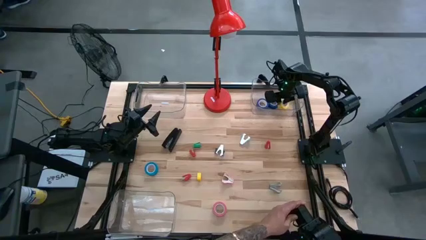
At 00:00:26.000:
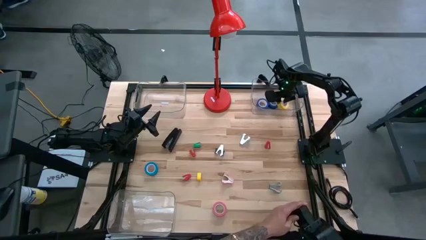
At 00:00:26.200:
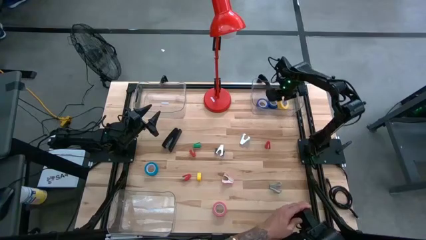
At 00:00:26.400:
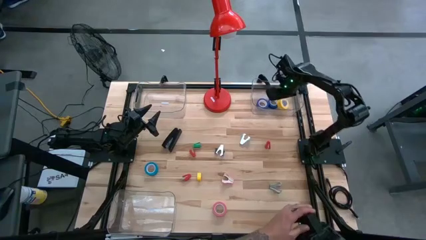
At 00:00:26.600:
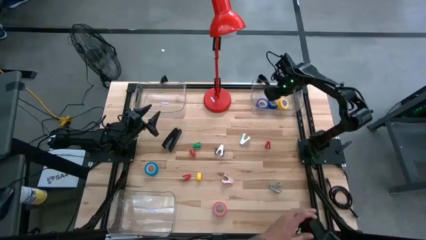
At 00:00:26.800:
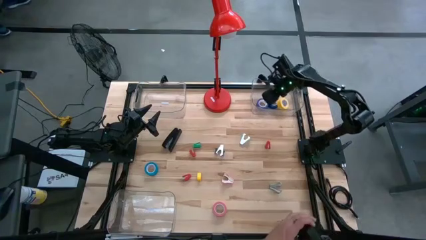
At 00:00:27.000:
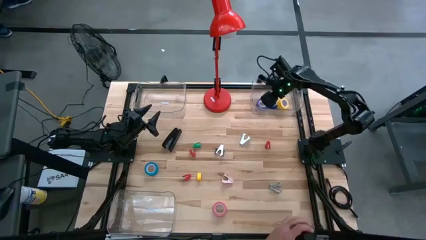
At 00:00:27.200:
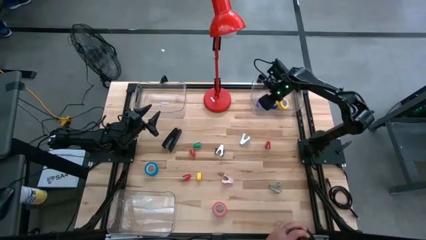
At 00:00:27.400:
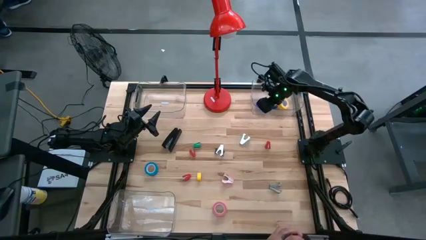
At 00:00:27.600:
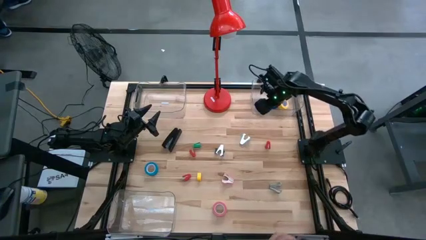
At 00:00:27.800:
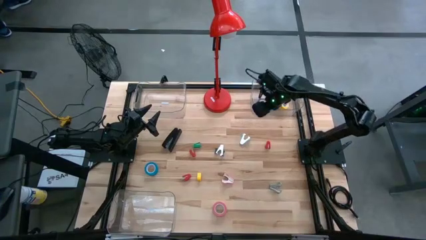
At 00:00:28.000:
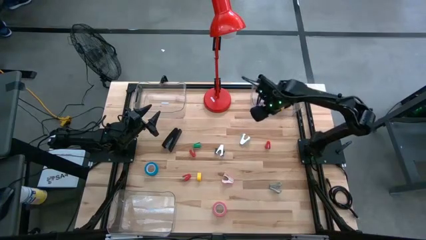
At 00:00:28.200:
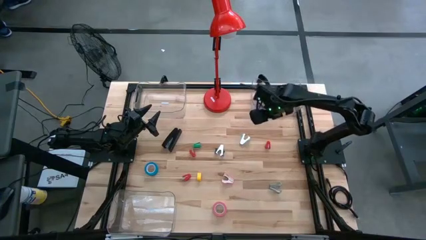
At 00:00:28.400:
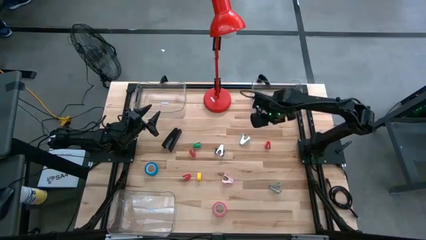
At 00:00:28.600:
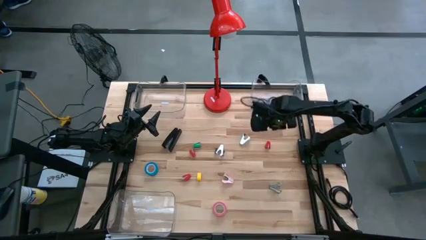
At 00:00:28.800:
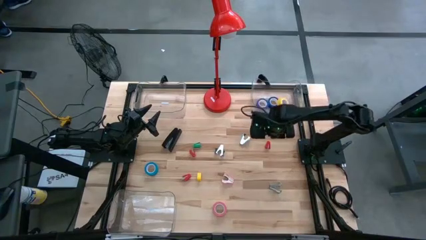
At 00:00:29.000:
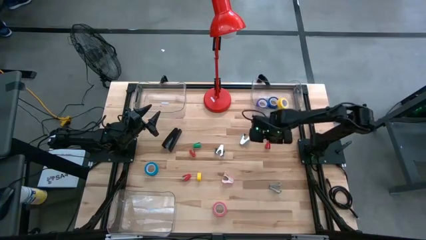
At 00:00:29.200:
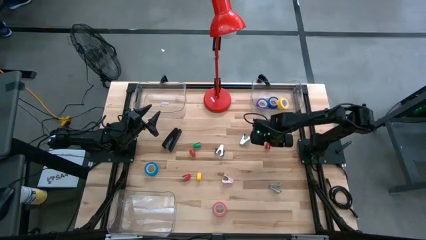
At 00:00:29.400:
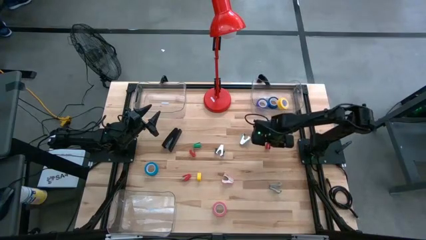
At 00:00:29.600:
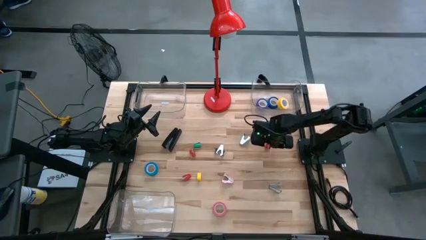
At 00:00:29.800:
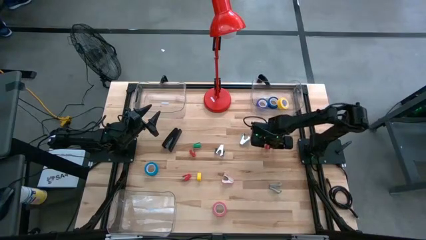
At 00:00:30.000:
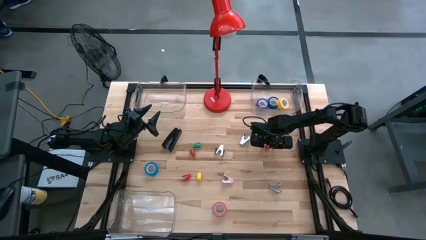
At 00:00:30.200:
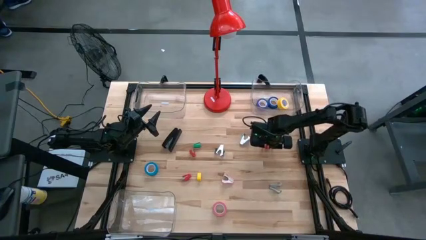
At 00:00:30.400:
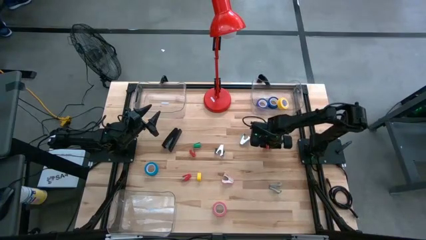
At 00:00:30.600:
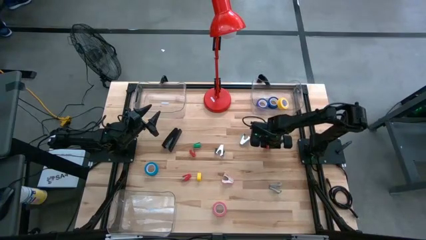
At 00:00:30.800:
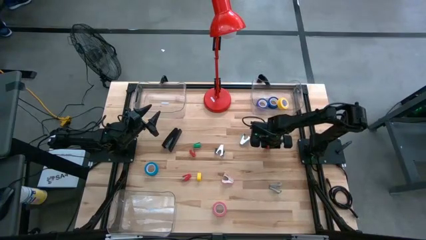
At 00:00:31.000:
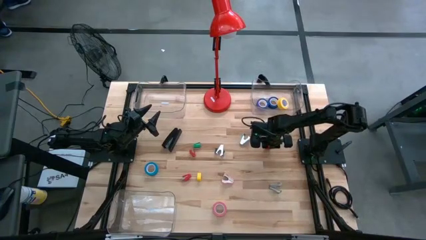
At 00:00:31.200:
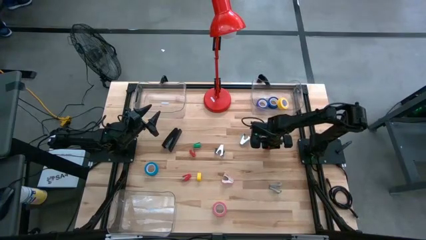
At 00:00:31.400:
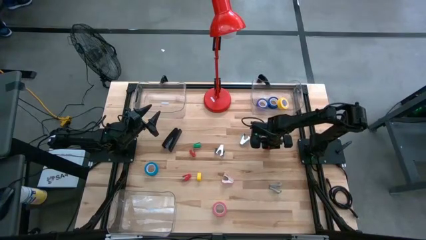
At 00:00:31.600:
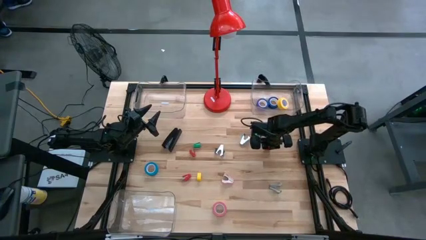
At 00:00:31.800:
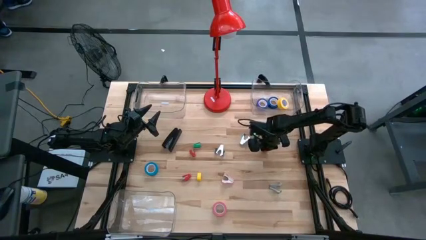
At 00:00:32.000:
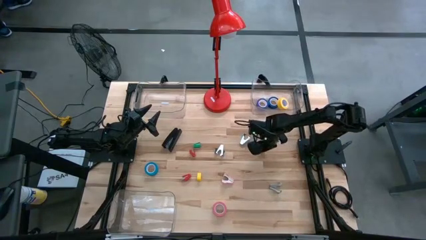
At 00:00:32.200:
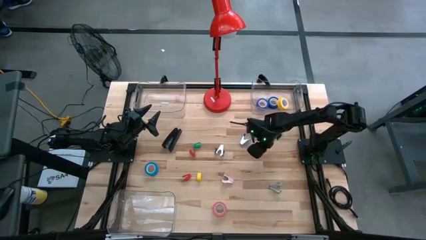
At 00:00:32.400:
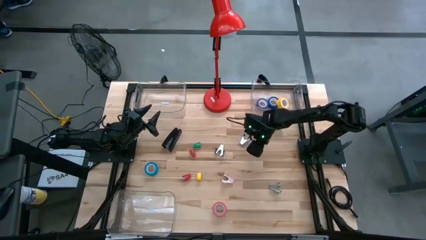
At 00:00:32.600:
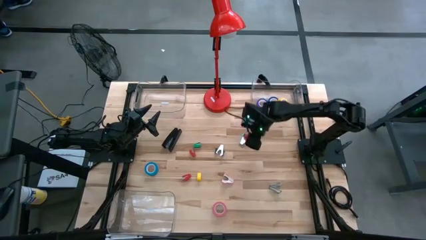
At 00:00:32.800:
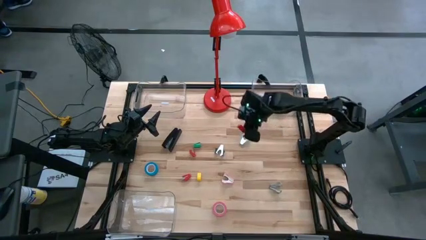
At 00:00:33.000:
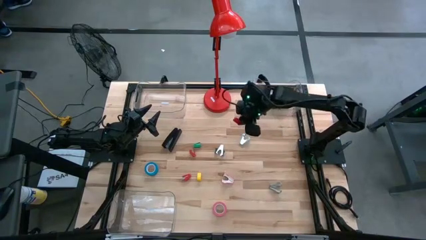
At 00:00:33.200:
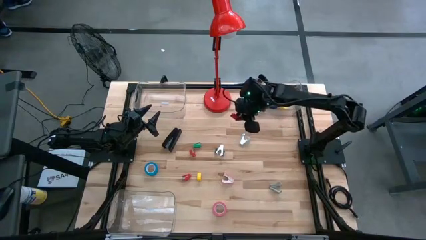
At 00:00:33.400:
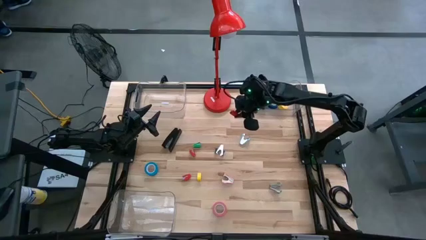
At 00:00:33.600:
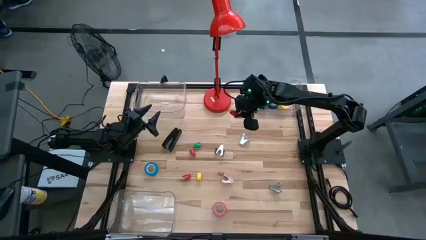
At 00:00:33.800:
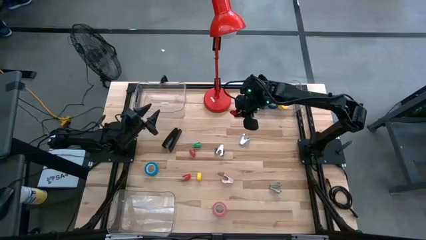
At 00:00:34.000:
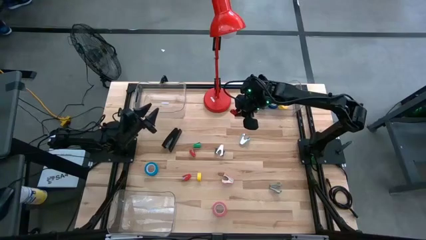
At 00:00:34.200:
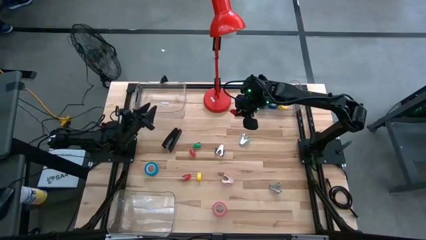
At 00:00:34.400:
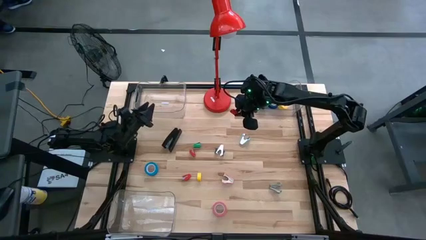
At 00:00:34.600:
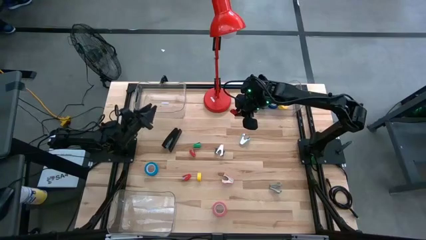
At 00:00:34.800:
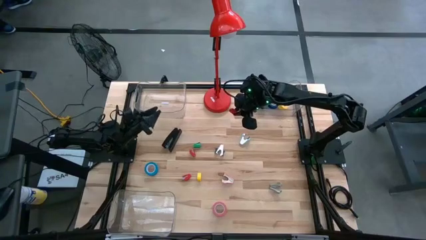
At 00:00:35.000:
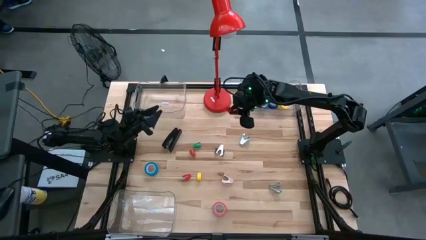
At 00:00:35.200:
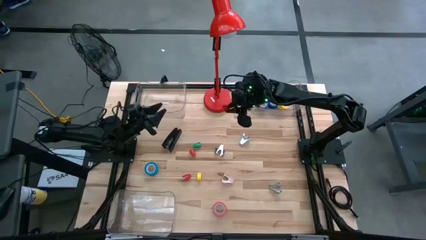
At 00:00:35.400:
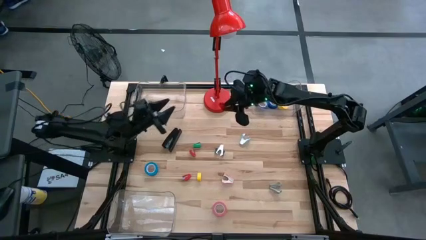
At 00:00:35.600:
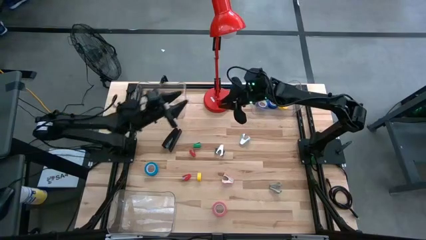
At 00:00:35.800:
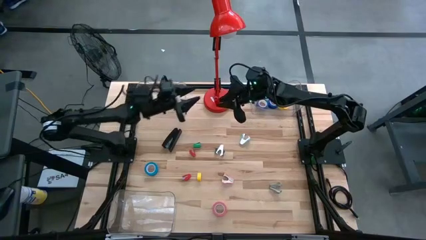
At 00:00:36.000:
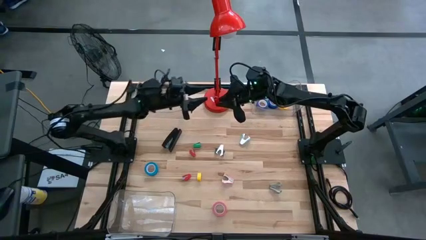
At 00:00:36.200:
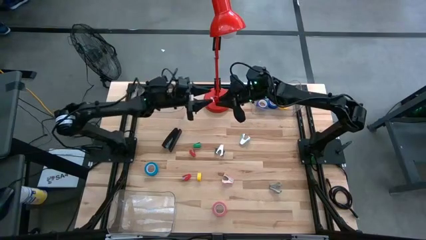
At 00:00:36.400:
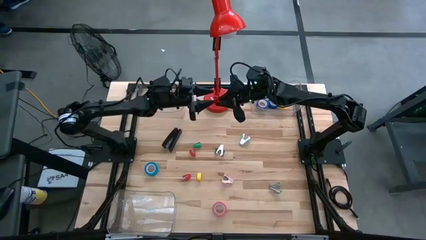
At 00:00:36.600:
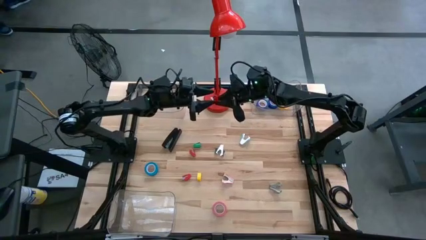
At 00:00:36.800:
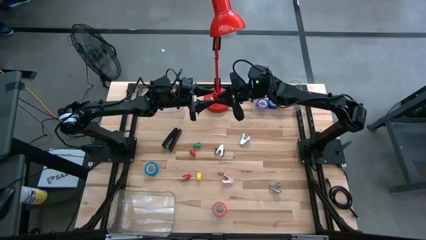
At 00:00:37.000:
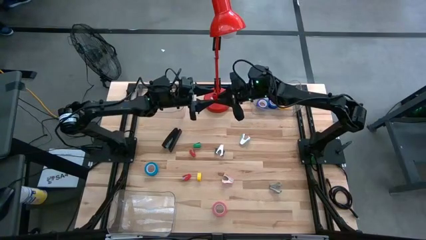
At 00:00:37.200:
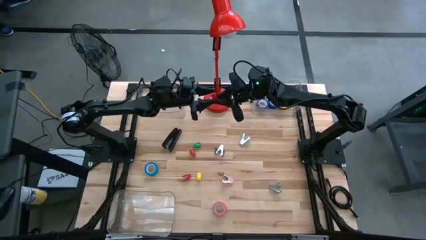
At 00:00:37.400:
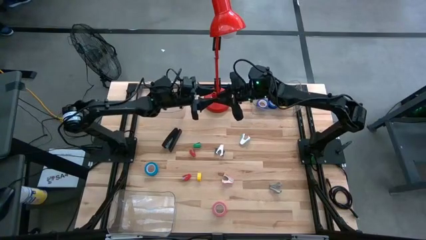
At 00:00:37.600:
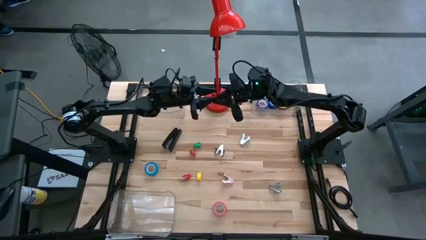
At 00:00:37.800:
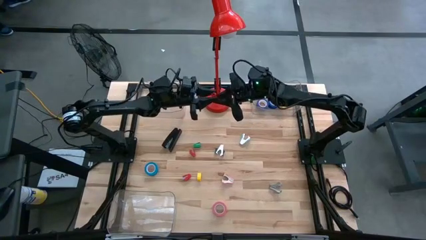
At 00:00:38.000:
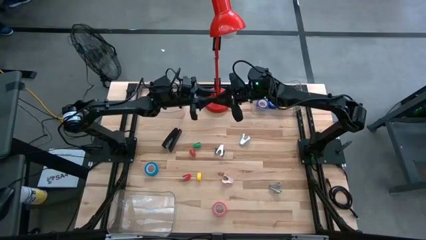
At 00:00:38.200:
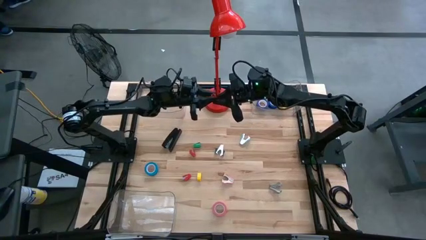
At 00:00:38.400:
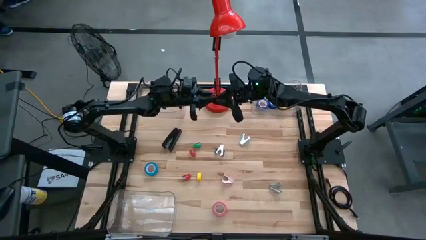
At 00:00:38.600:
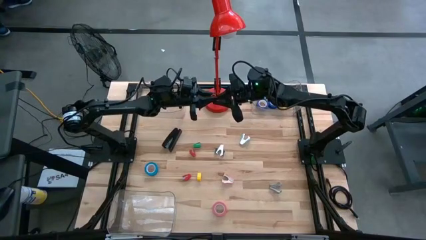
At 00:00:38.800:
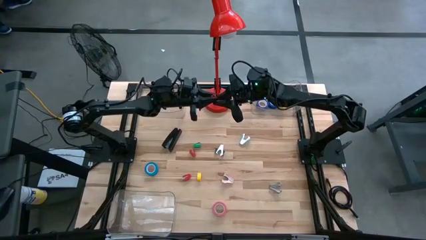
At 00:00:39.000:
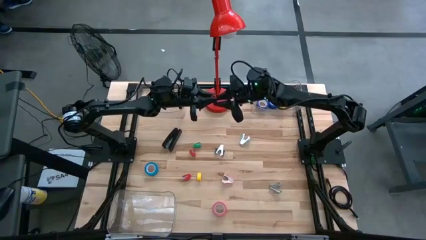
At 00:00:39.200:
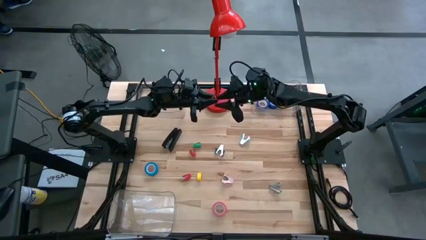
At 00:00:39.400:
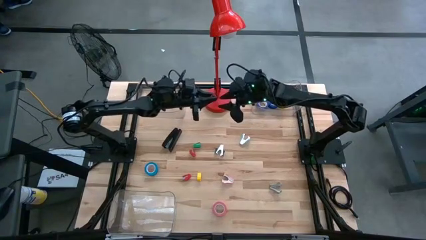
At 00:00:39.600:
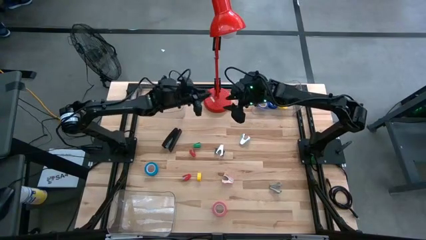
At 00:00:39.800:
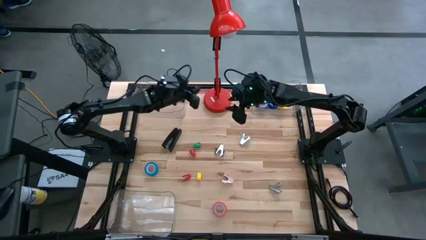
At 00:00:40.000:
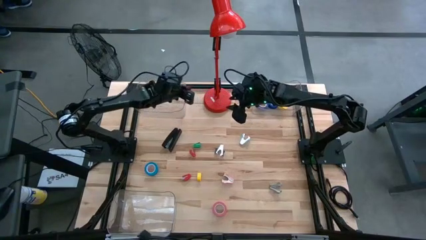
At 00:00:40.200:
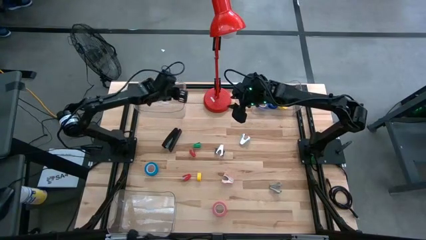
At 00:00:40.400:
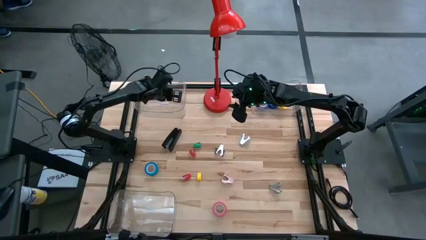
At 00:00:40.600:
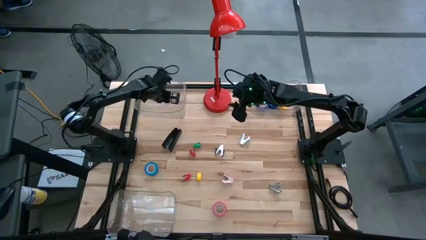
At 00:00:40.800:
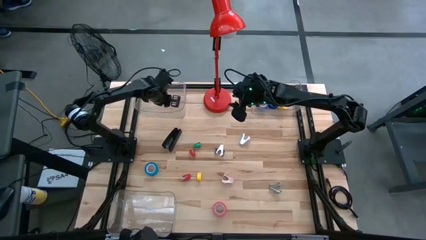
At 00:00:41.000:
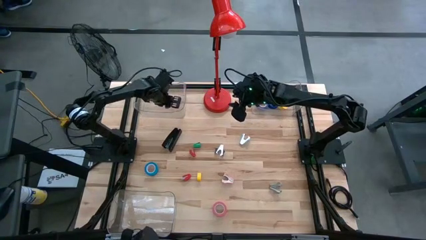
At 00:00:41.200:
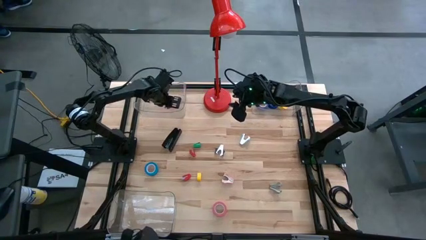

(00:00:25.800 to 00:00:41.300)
Task: Pick and place Stapler, Stapler remover, tape
Put the top right red stapler into the top left transparent bin
